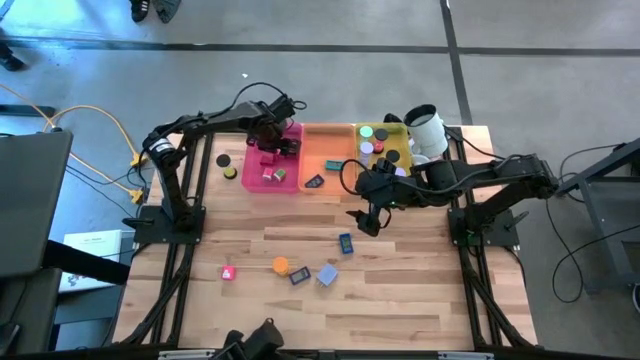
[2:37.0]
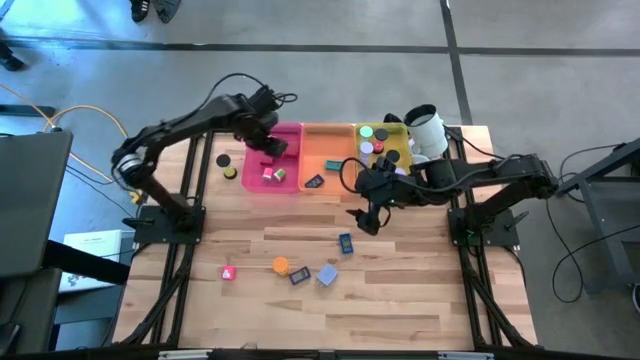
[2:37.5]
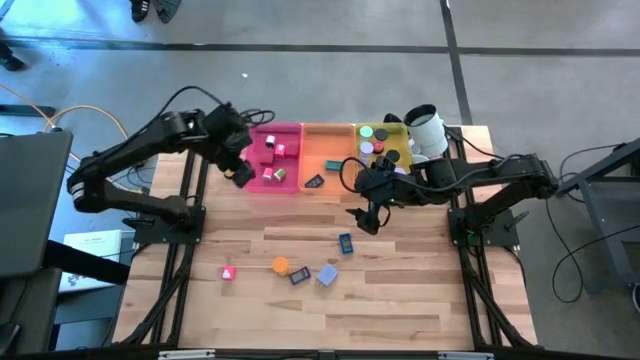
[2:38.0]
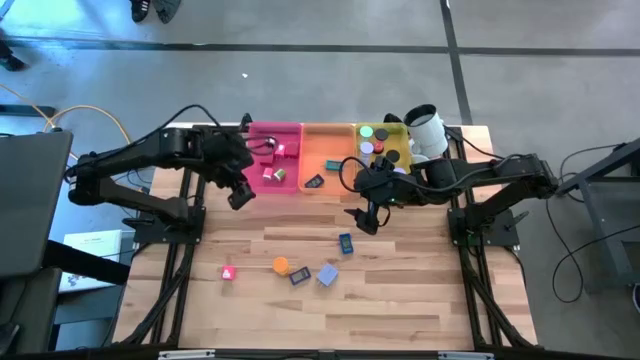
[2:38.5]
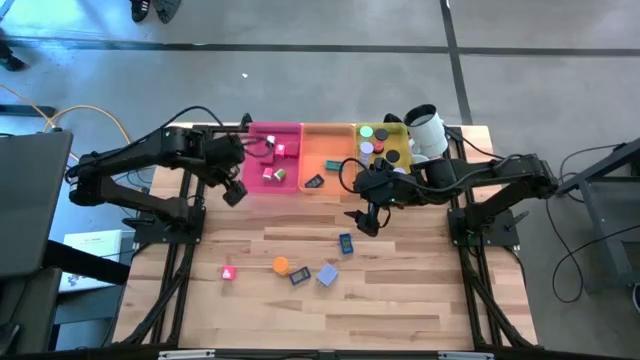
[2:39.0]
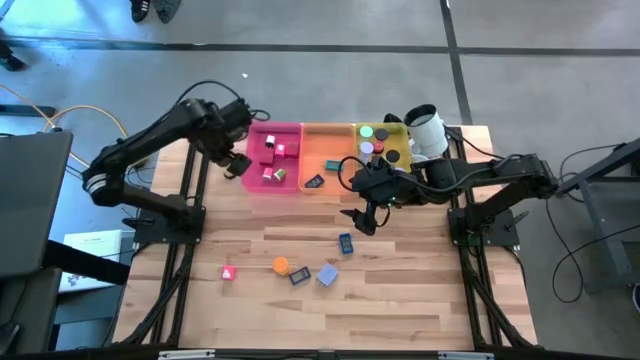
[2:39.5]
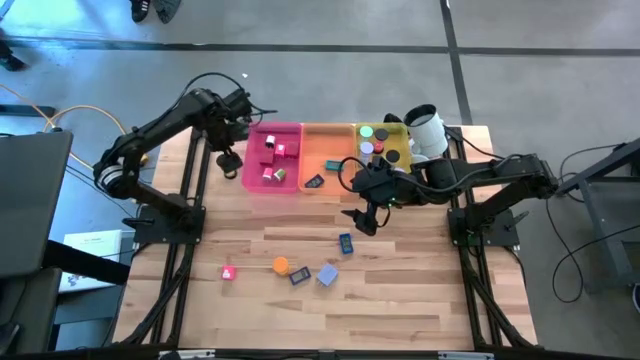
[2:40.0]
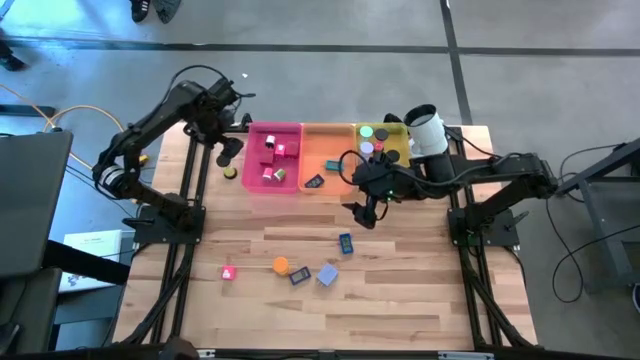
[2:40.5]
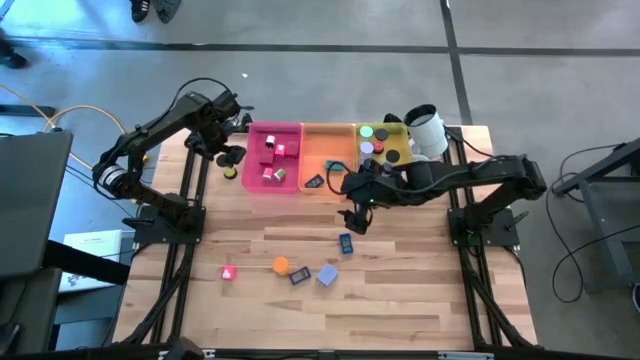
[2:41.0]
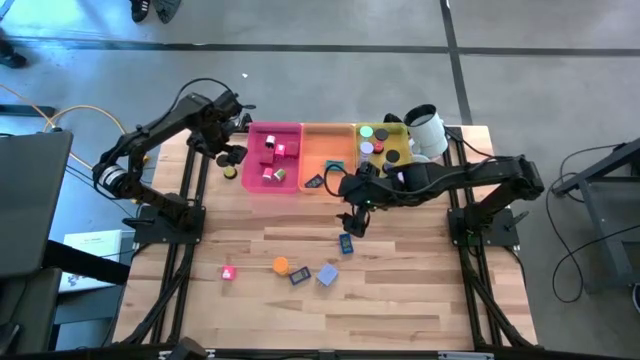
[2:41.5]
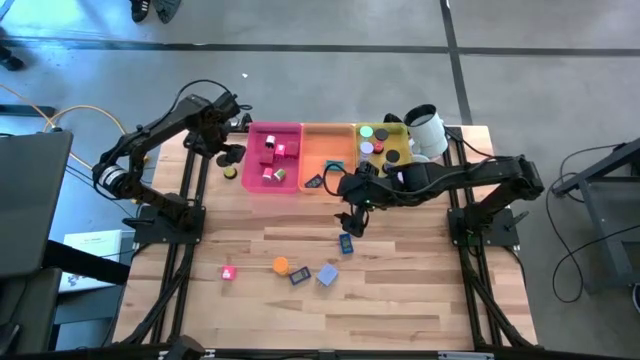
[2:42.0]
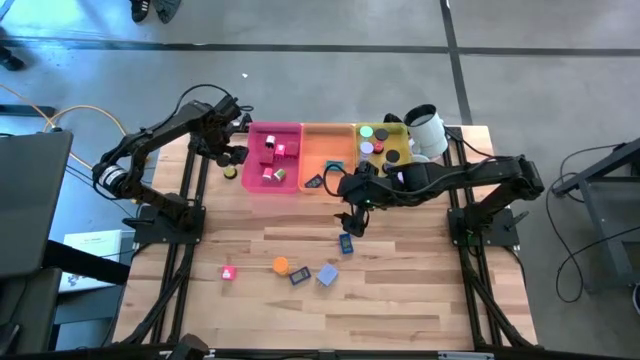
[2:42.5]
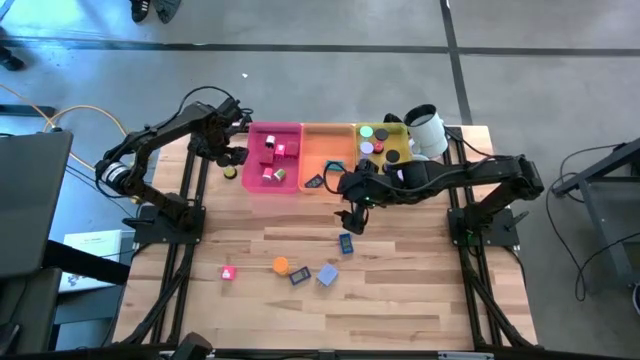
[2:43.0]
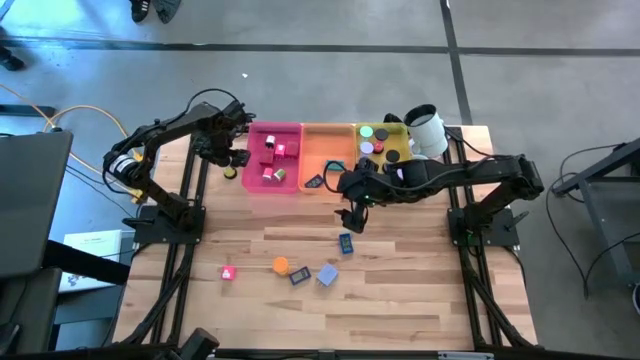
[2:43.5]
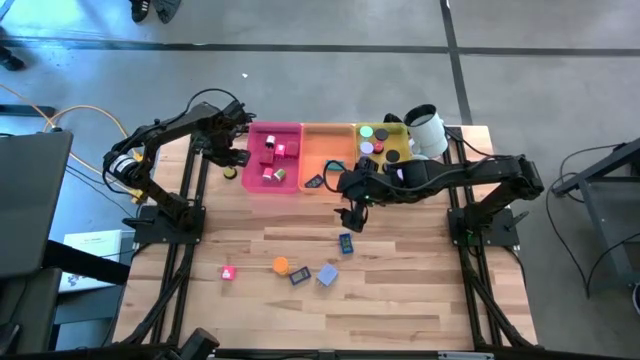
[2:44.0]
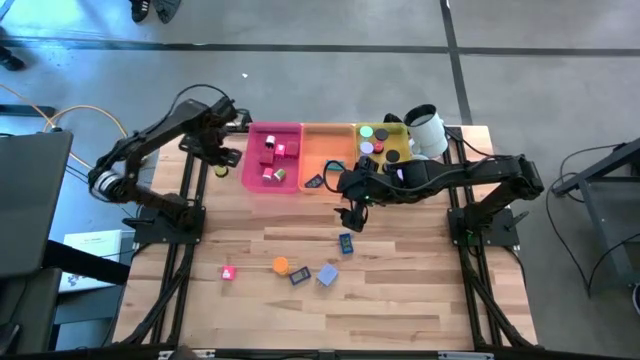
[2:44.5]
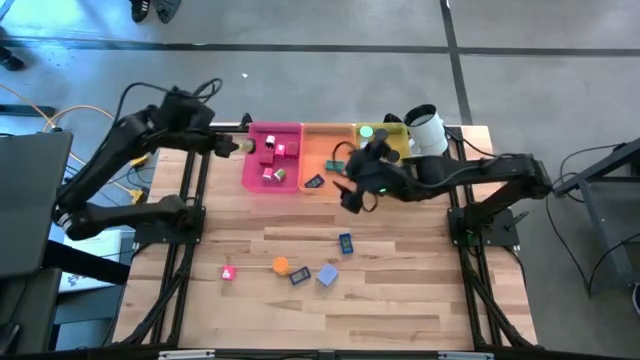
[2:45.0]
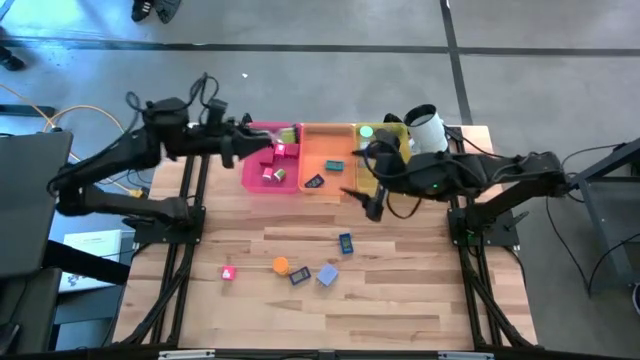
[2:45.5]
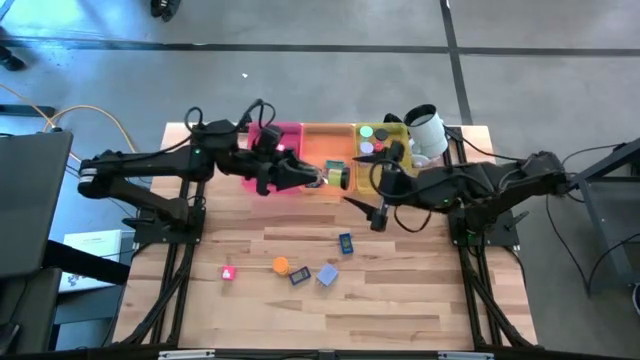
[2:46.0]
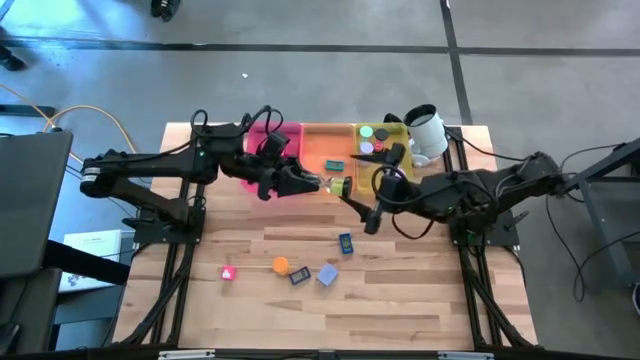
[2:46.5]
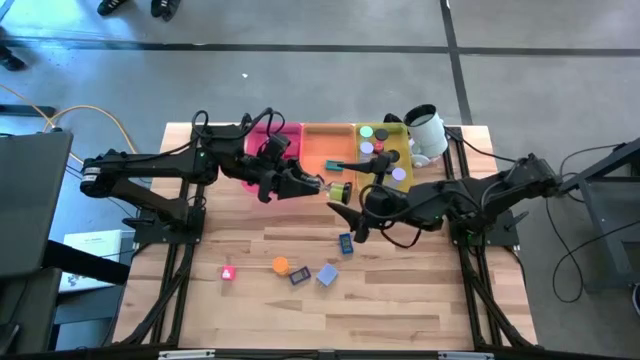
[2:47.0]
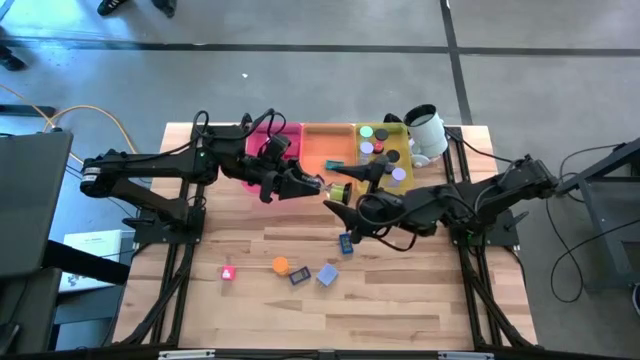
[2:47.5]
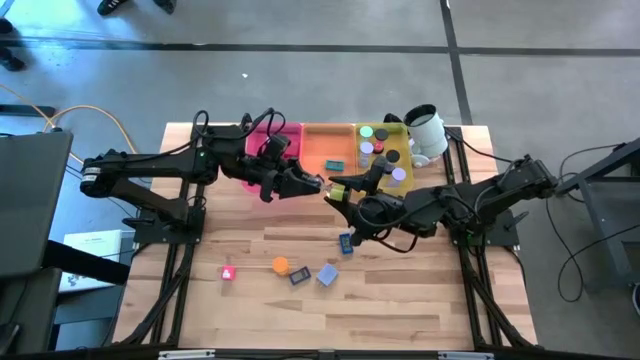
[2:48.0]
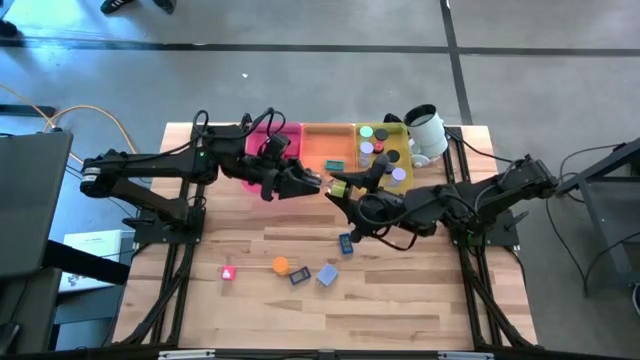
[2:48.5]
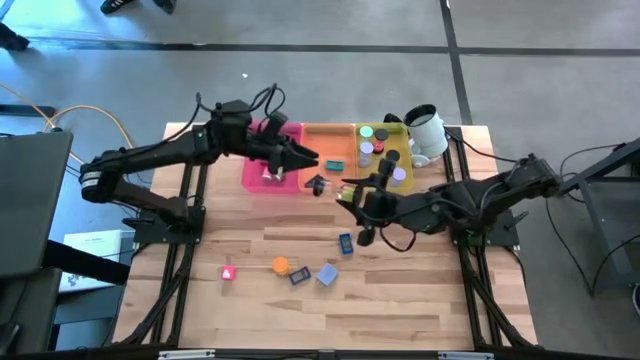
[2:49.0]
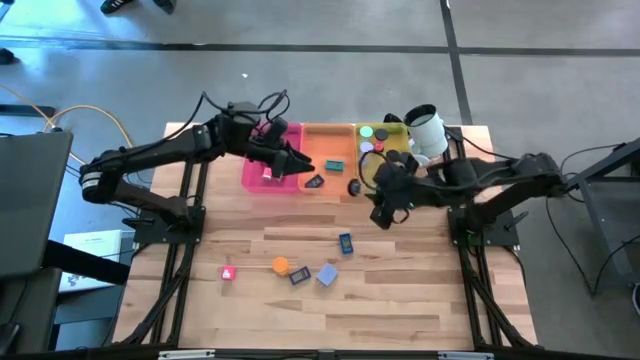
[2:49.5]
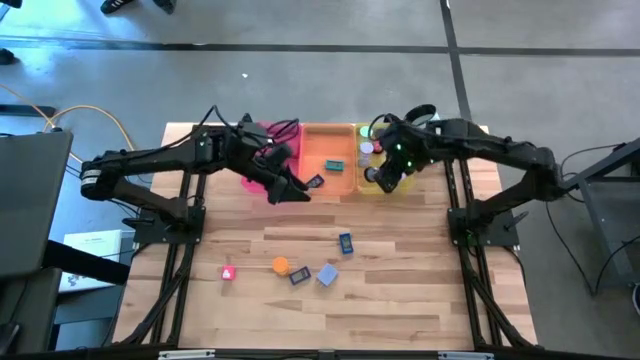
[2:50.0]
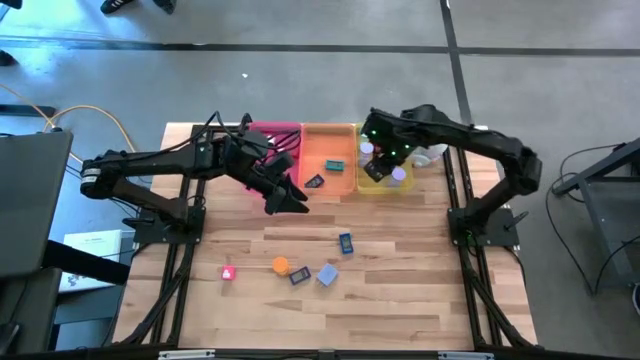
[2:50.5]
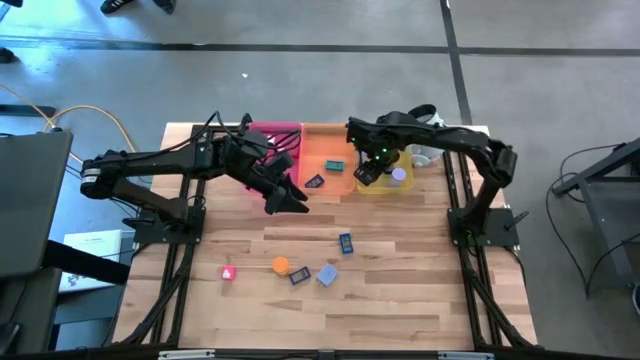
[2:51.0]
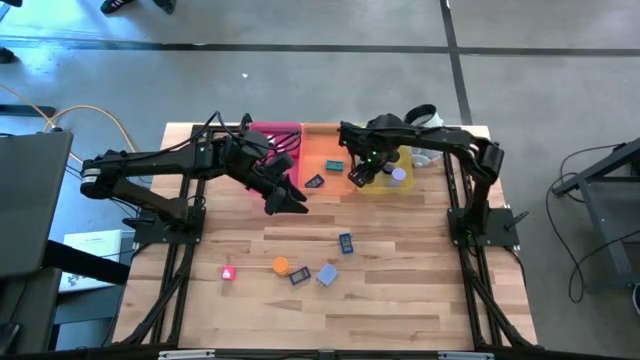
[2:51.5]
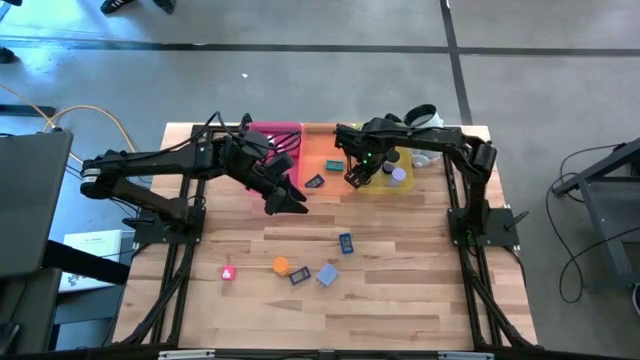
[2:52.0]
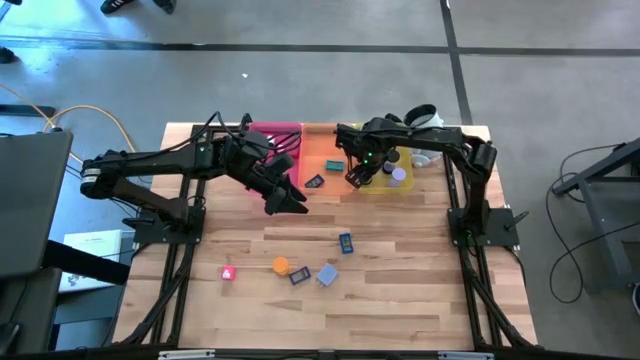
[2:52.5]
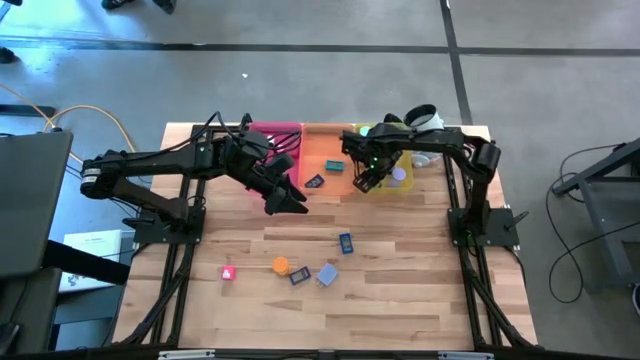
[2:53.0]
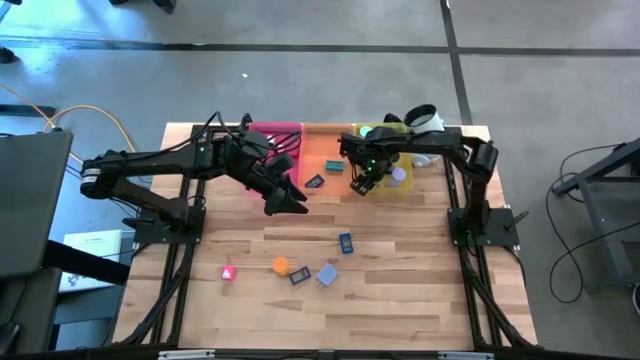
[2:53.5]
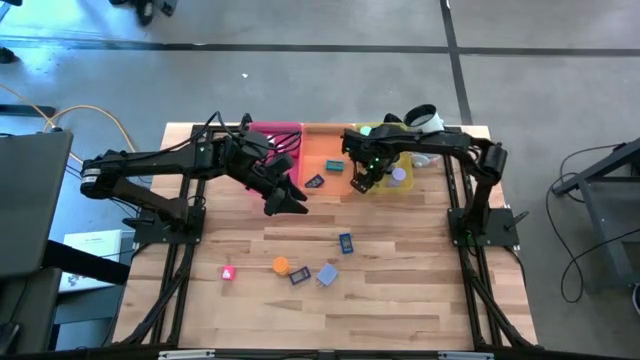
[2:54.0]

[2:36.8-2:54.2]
Task: Pick & Place Office items
Put the black hourglass into the yellow bin

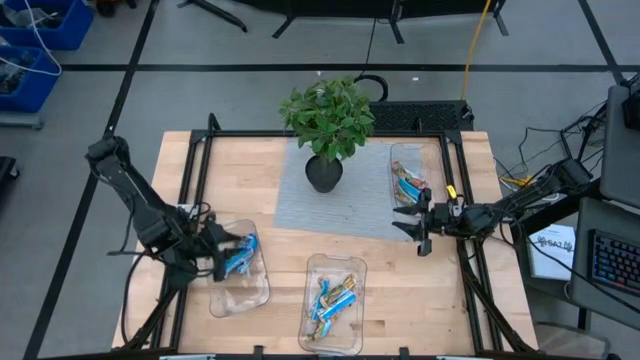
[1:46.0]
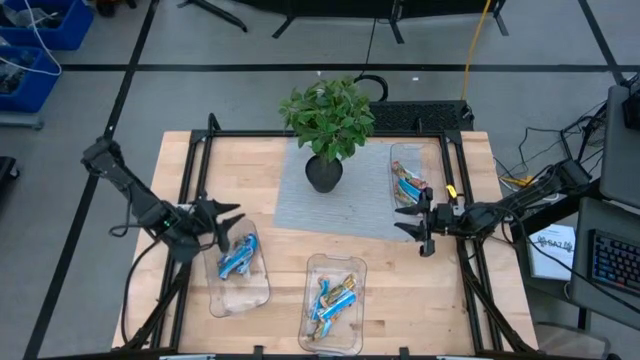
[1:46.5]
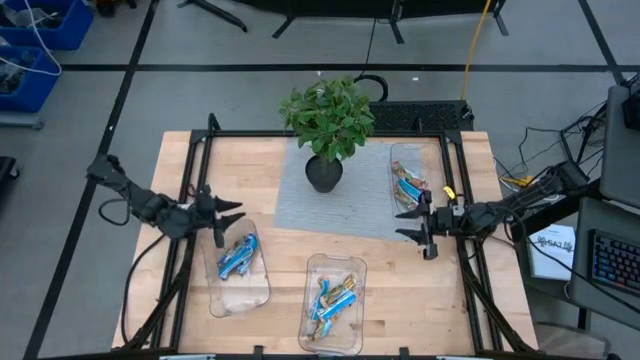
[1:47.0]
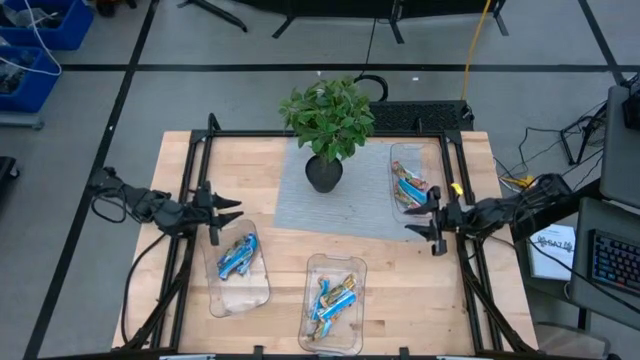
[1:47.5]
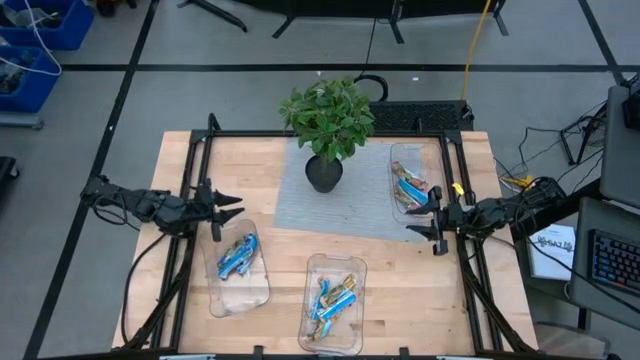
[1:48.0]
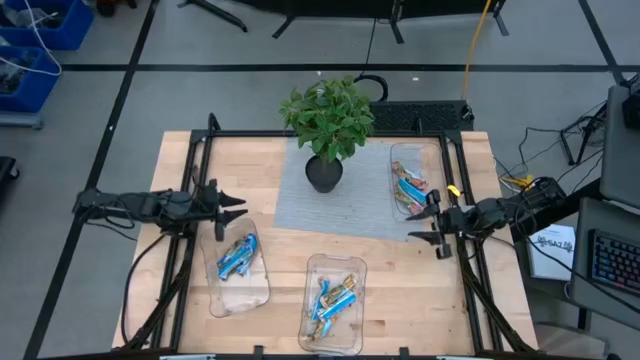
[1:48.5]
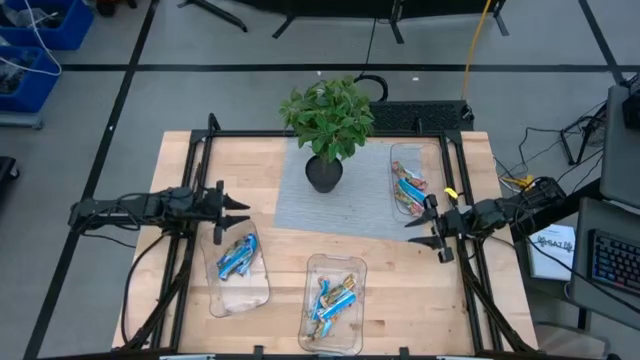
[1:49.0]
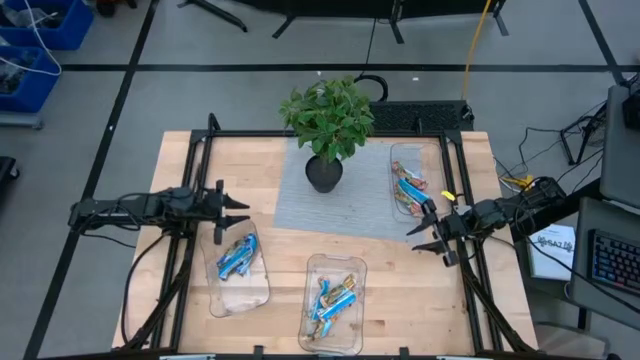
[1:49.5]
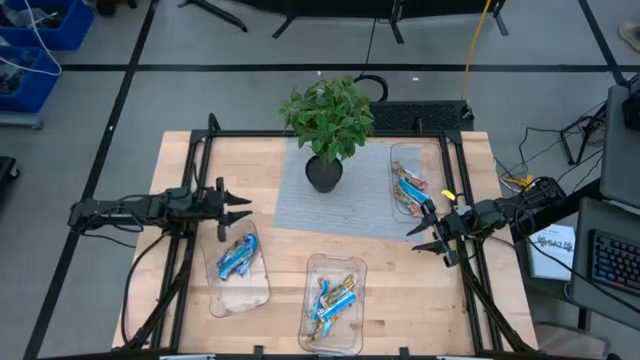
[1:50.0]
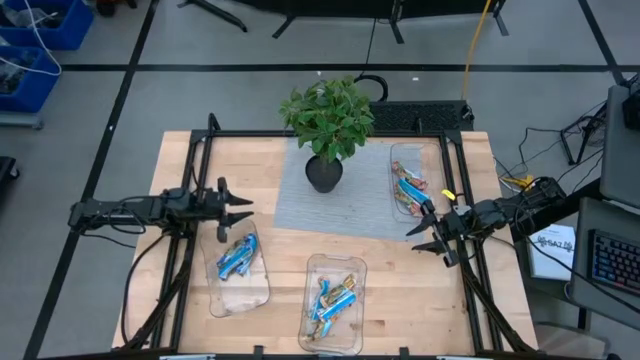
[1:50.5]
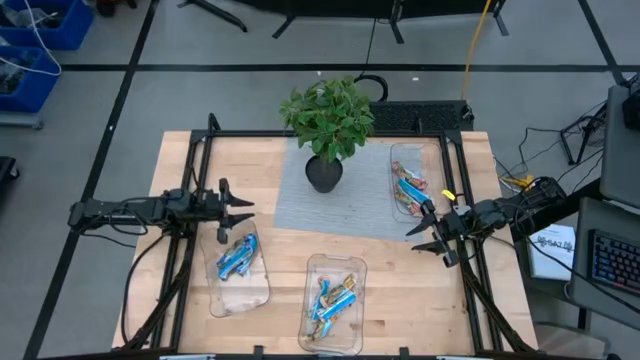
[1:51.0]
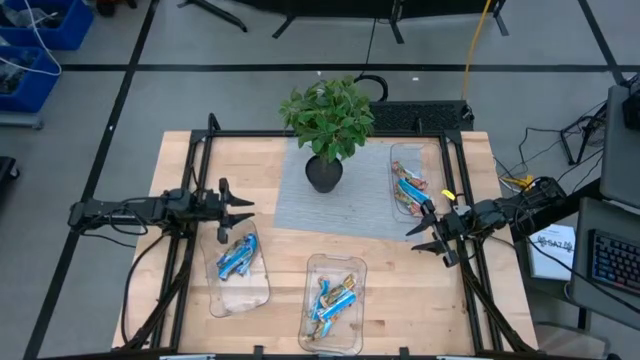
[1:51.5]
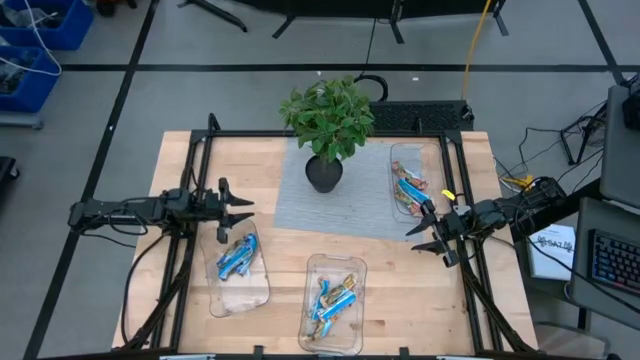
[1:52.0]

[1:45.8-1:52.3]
Task: Pick and place Granola Bars by type
Return to Home Position
